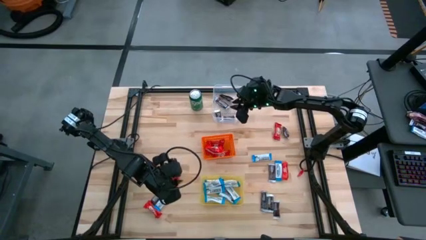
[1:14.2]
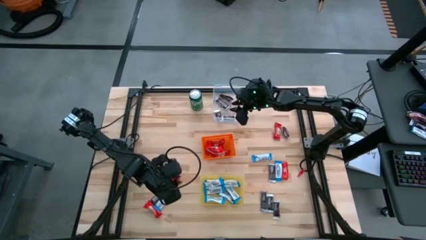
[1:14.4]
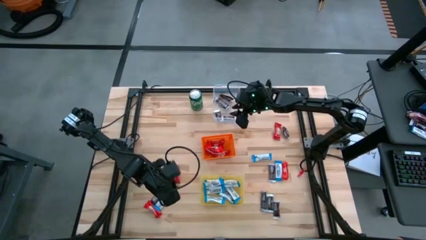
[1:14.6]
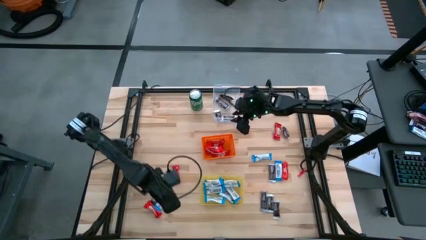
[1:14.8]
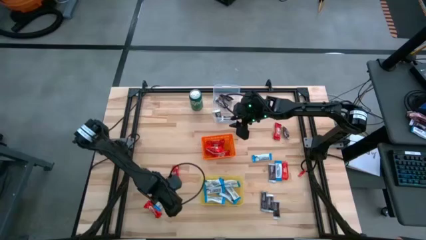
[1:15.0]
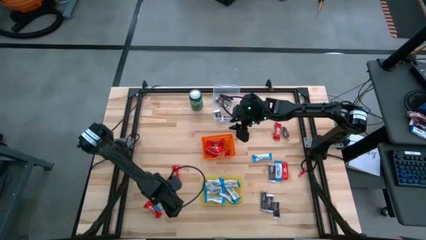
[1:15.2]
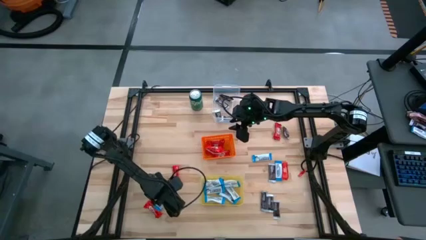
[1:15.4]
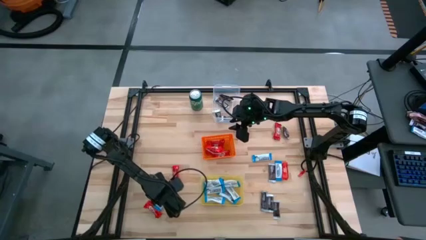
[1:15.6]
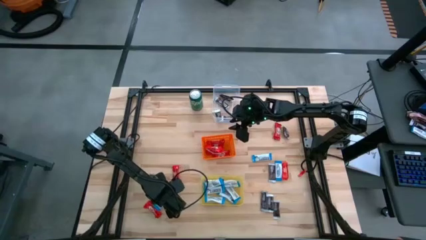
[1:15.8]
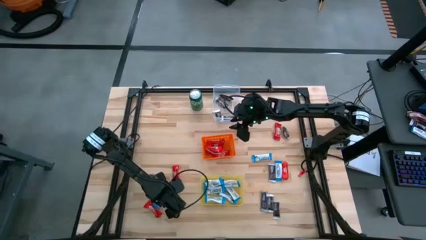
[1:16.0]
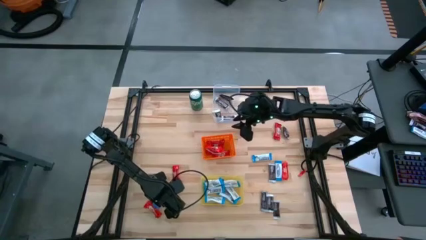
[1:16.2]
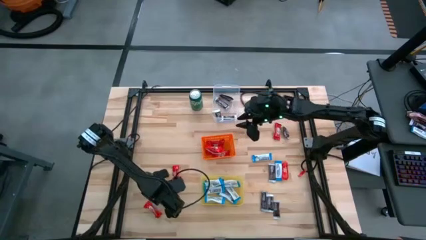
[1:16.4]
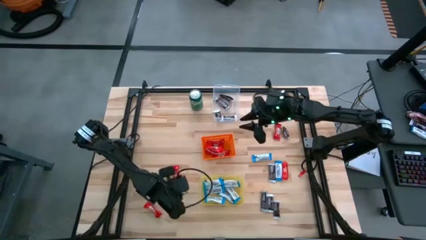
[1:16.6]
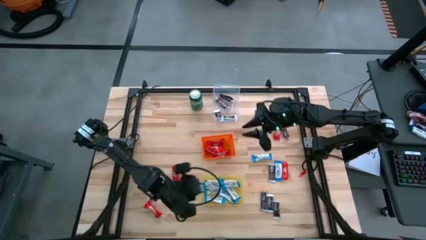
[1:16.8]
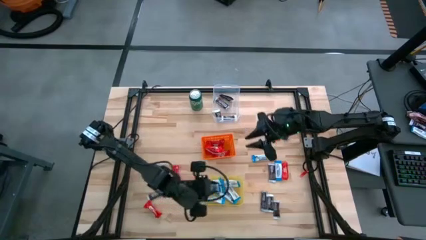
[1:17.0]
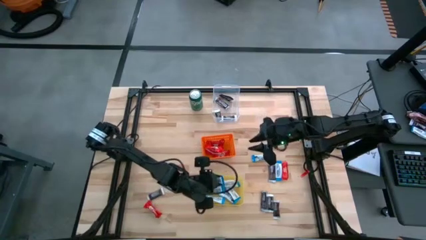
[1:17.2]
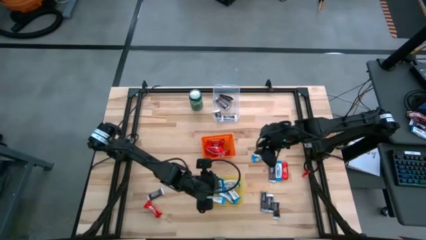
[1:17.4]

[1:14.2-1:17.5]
Task: Sort candy
Put the white candy into the yellow bin

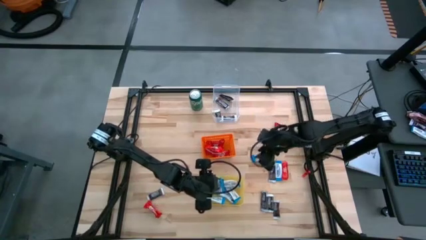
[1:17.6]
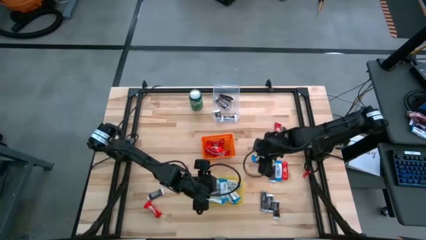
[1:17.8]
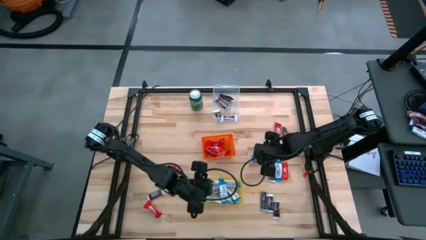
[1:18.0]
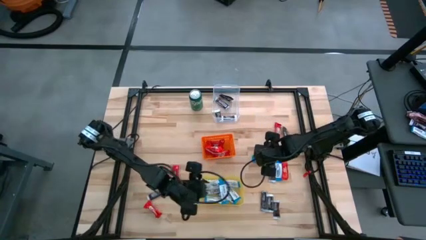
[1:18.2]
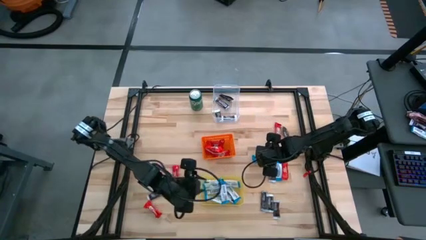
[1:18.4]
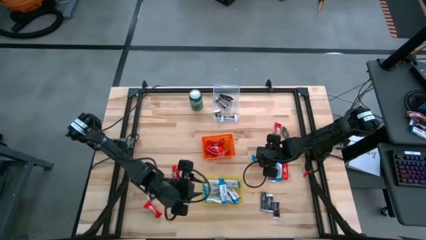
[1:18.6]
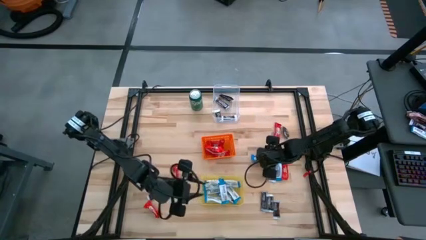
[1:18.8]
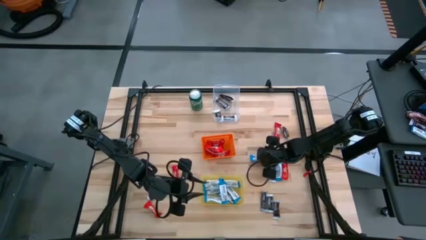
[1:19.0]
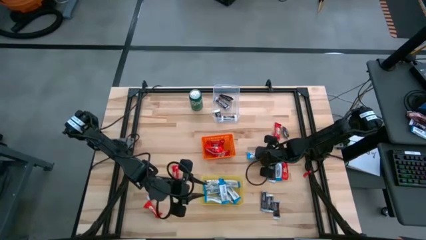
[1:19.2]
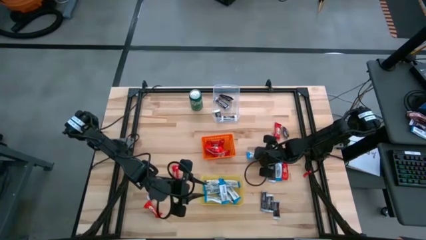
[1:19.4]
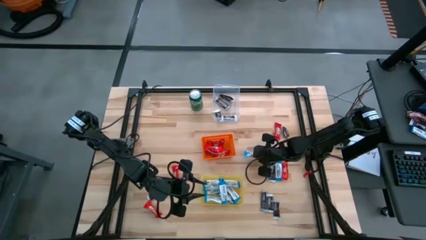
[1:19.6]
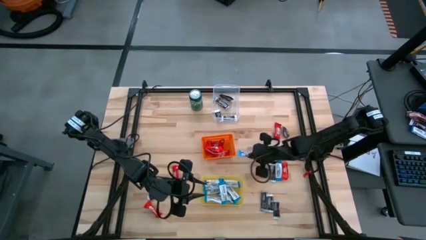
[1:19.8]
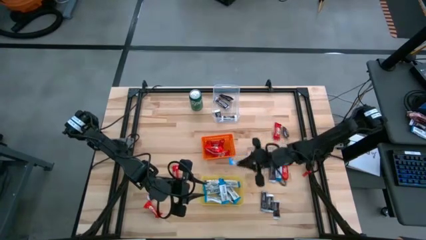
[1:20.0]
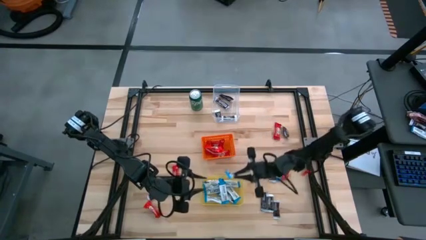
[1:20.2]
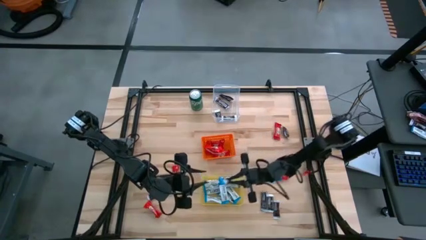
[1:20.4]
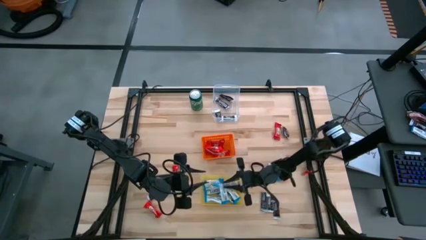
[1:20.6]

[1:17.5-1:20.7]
Put the white candy into the yellow bin

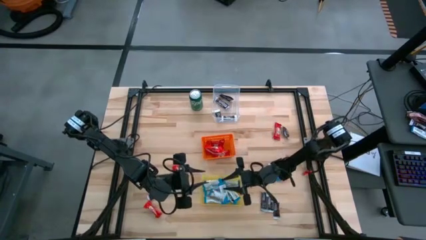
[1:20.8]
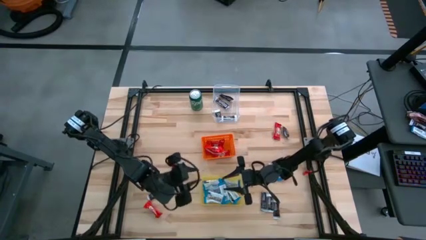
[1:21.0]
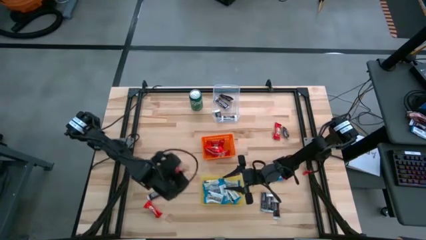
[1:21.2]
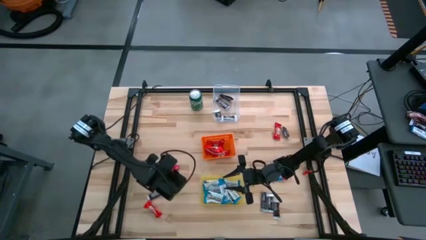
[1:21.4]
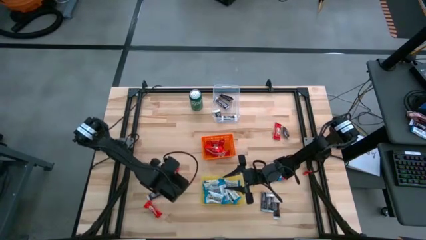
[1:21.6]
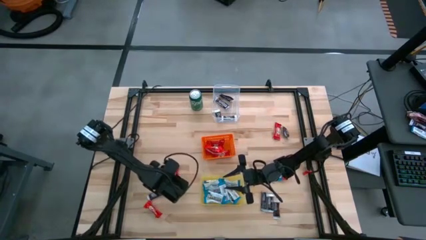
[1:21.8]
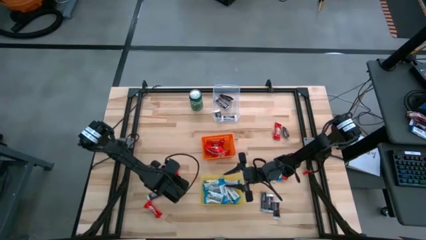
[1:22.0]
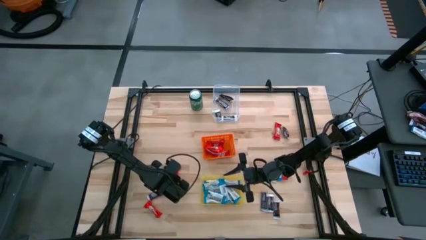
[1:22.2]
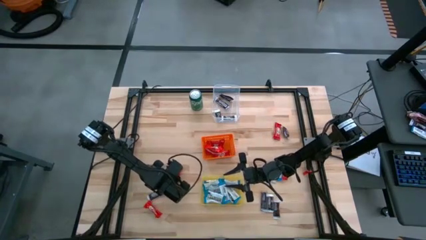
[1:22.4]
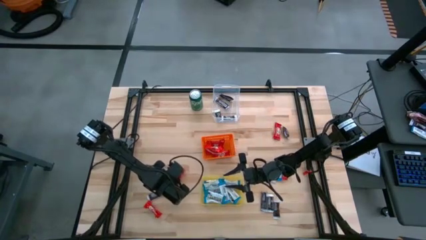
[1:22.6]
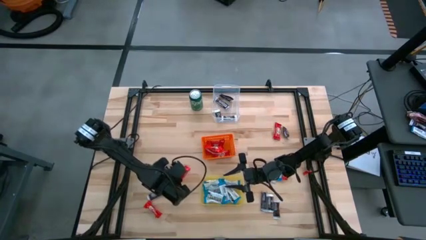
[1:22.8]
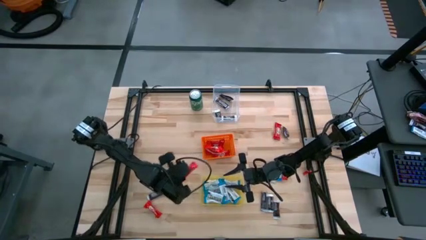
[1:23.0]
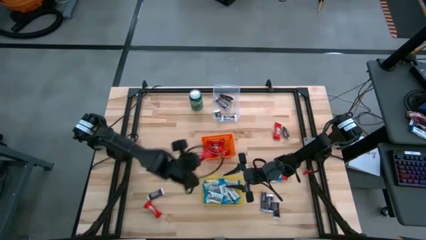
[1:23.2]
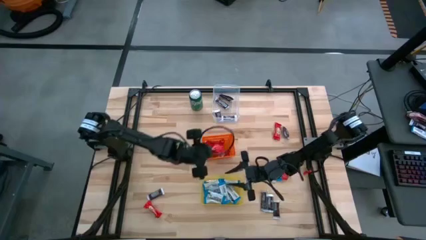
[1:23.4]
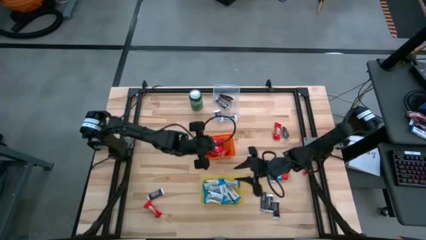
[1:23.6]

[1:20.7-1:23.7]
Put the red candy into the orange bin

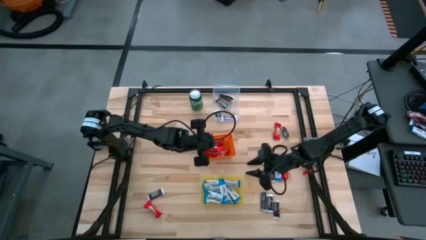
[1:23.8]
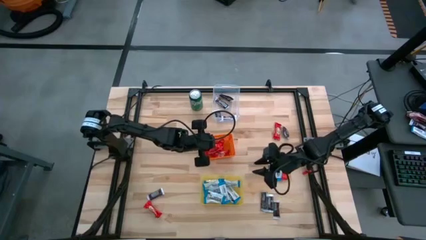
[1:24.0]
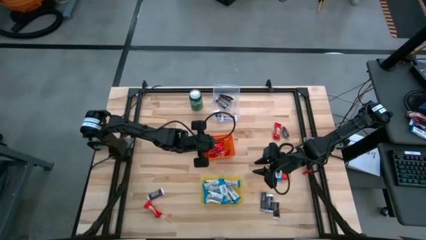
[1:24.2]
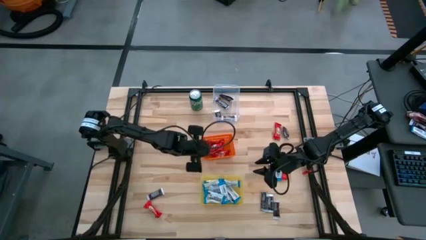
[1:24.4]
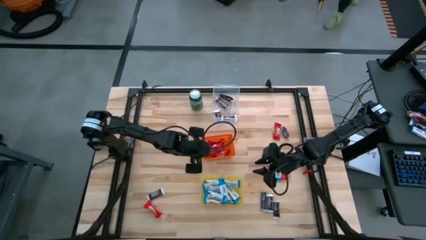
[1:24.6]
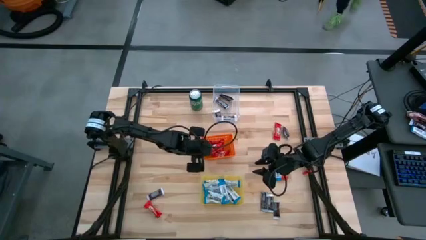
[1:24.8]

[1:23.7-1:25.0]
Adjust the red candy in the orange bin

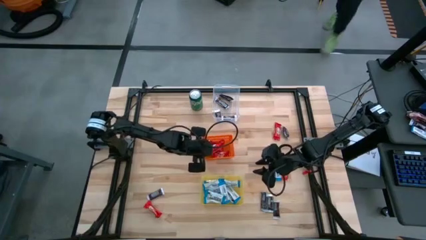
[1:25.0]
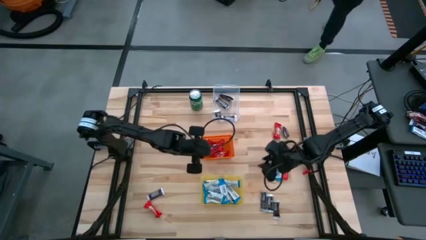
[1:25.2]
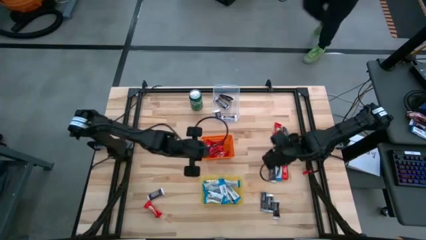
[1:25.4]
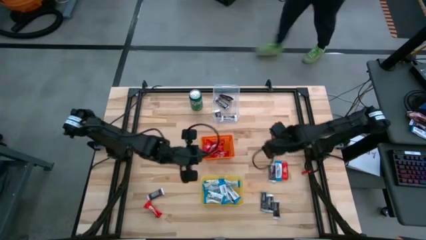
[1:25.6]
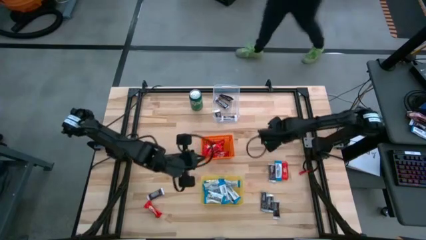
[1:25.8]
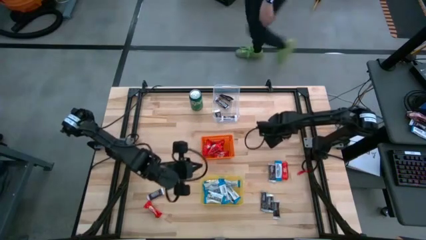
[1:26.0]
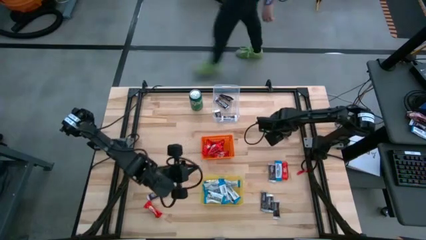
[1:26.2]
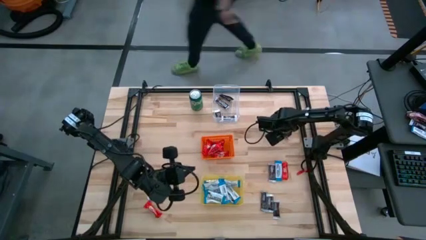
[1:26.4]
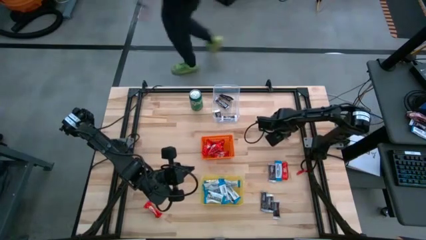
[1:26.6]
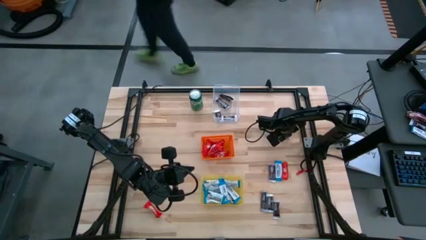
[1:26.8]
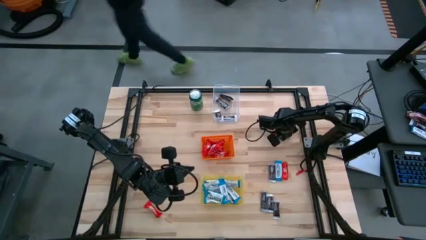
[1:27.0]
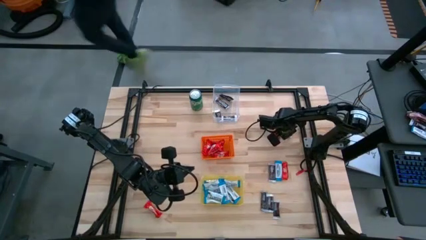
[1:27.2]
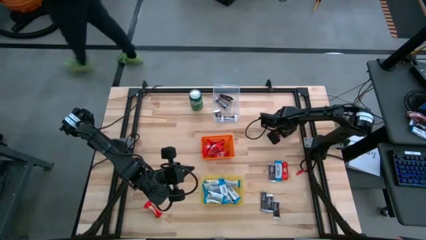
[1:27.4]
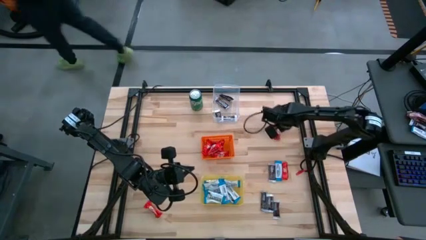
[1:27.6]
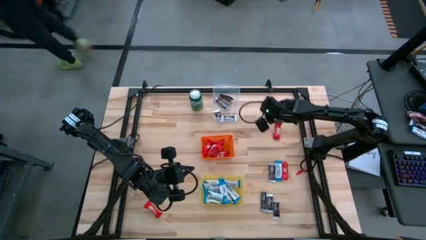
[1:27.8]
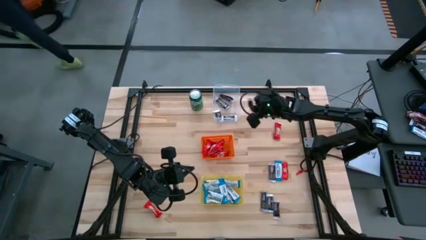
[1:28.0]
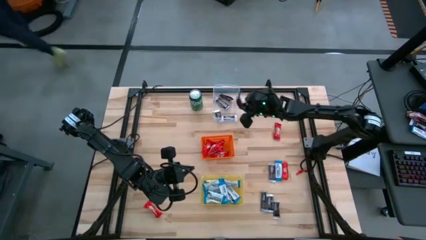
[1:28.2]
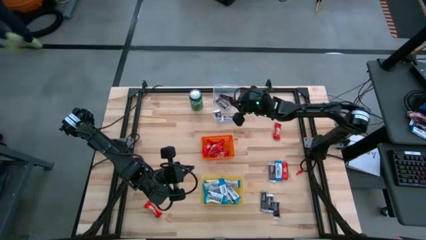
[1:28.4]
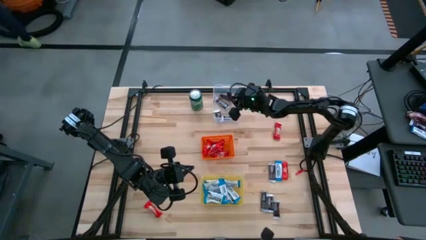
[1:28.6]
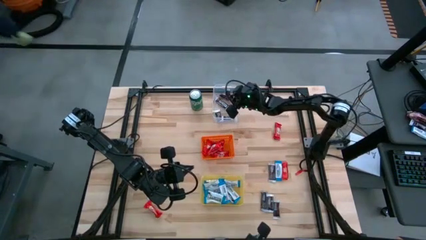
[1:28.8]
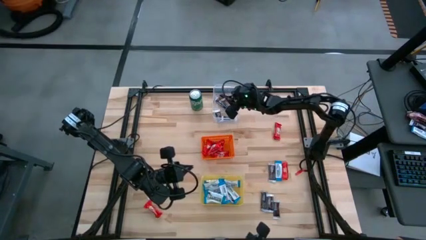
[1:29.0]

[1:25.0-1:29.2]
Put the black candy into the transparent bin

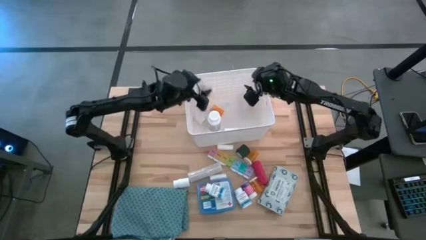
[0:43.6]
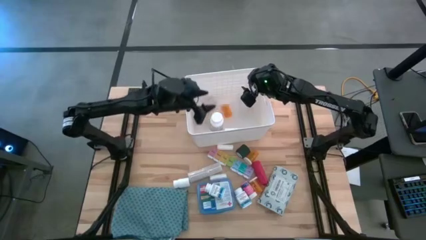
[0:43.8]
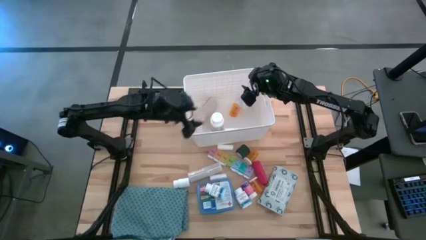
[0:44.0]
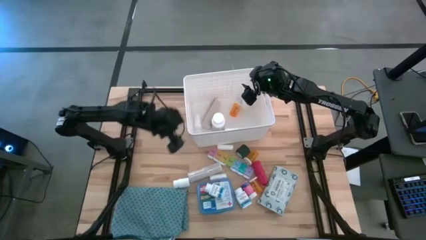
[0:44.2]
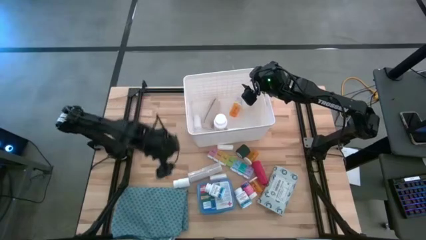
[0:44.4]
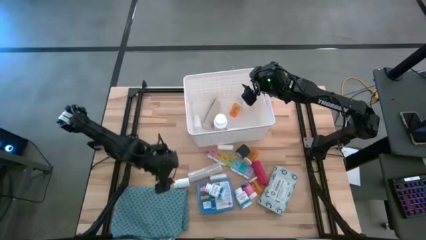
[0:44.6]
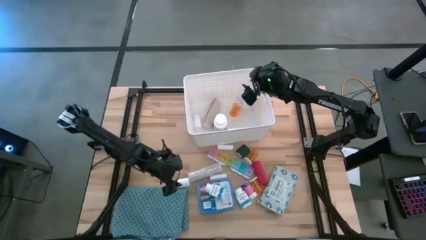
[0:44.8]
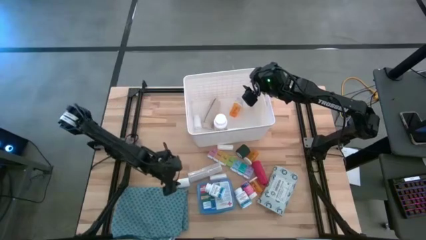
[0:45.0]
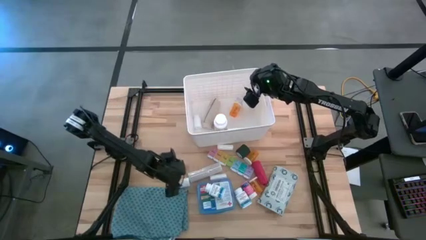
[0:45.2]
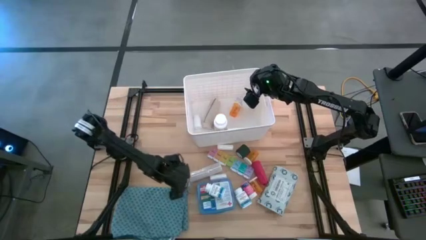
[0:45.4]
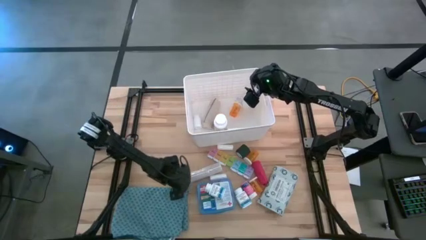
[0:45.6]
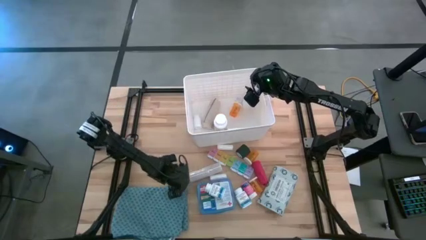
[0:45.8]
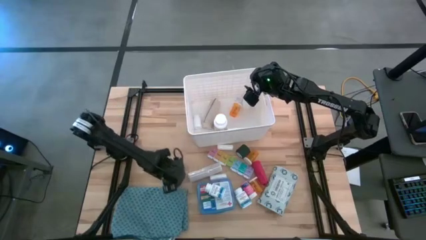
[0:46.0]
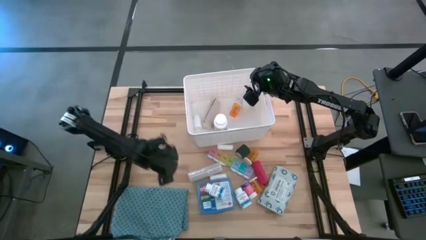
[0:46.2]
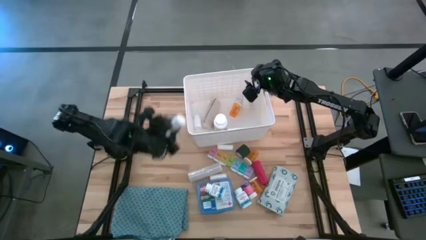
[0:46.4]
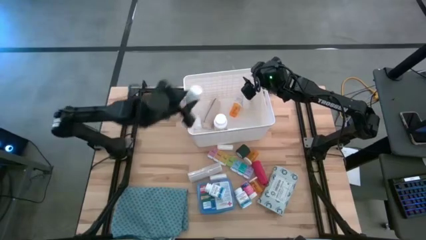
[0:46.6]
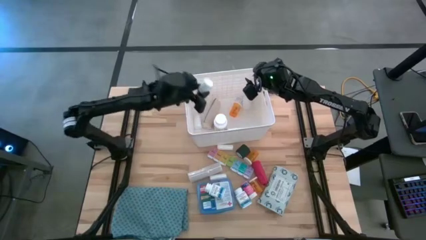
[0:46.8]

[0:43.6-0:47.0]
Task: Pick & place medical supplies in basket/bin
Put the white medicine bottle into the bin
